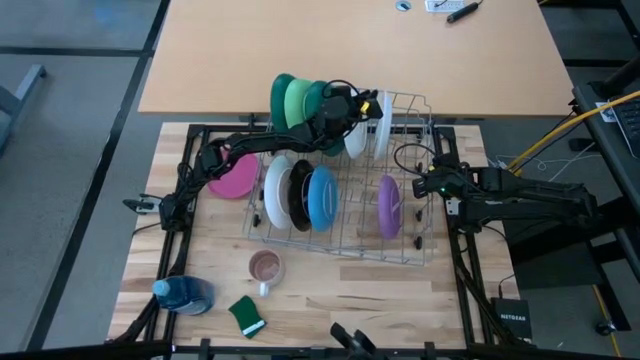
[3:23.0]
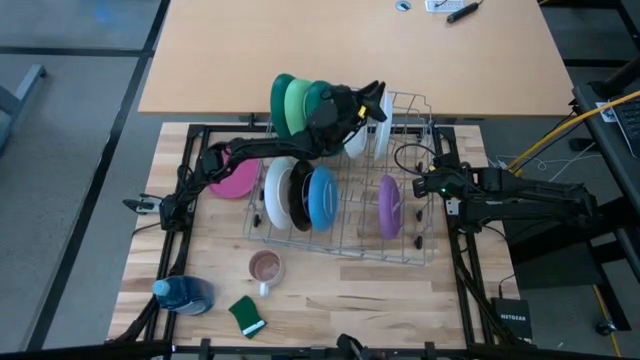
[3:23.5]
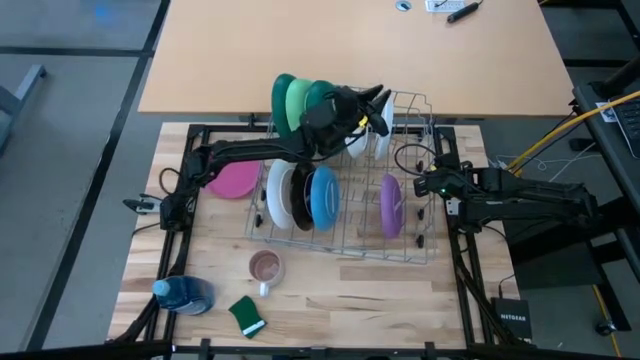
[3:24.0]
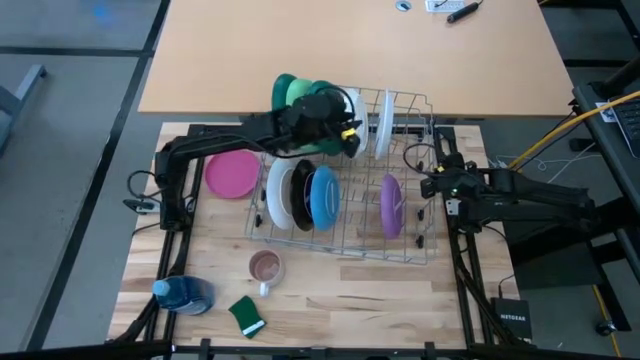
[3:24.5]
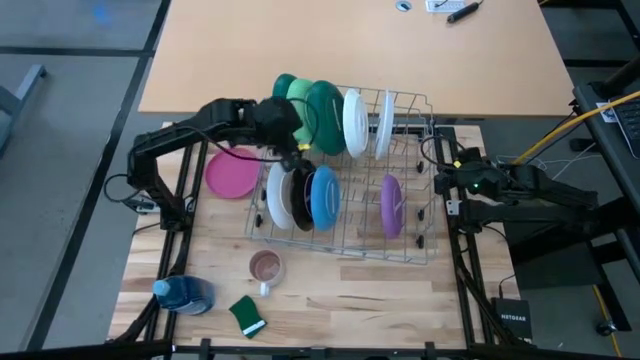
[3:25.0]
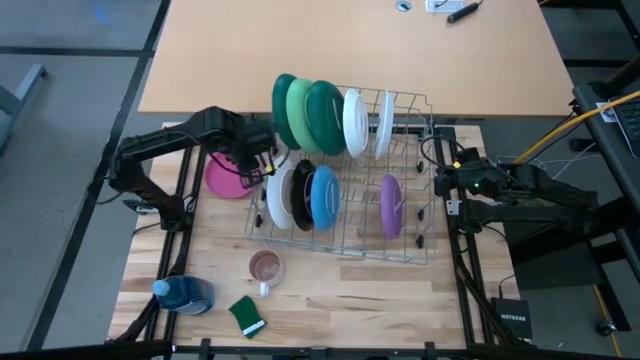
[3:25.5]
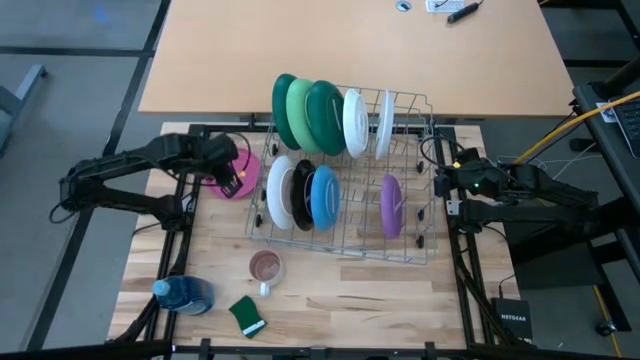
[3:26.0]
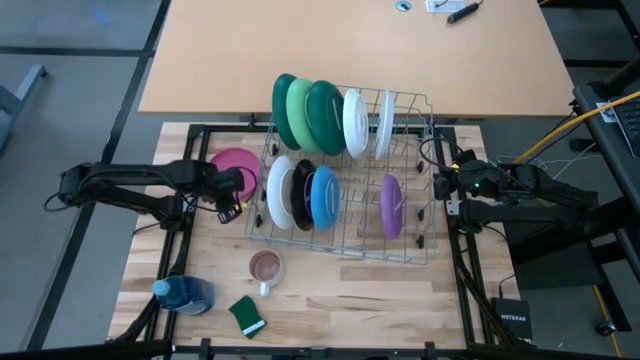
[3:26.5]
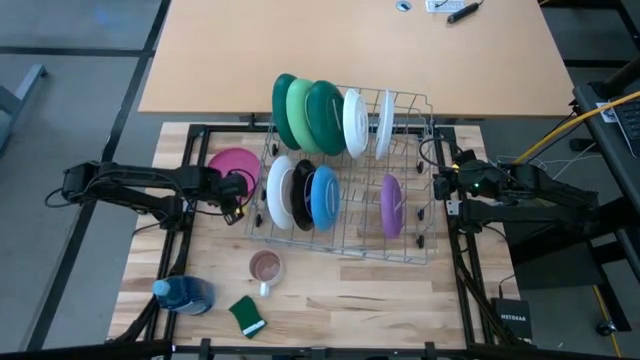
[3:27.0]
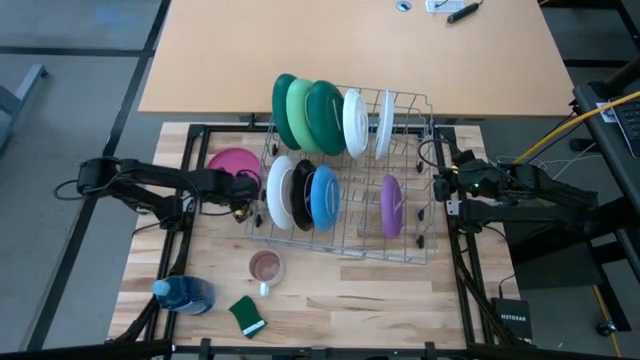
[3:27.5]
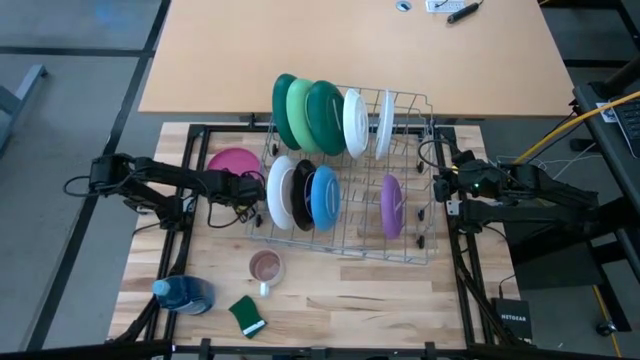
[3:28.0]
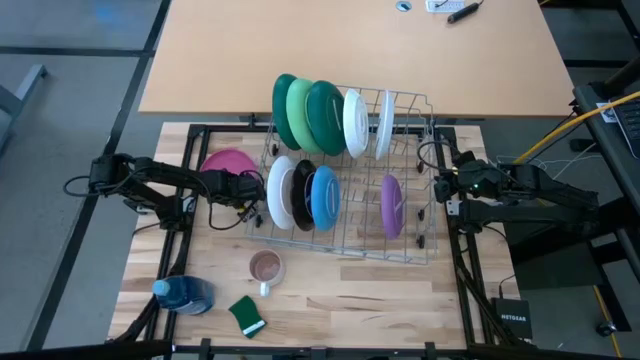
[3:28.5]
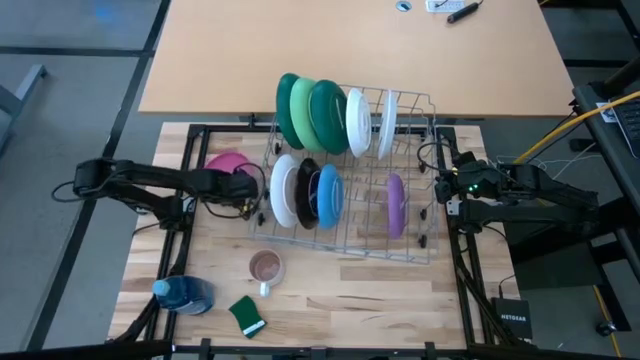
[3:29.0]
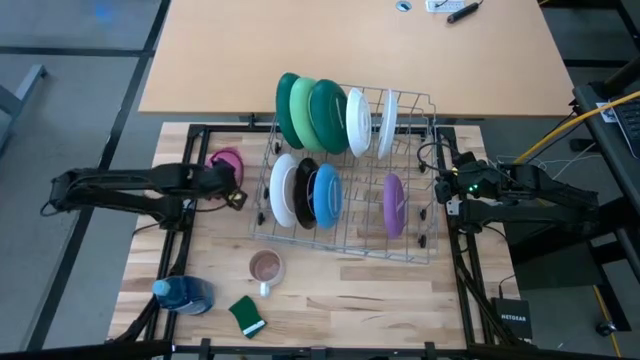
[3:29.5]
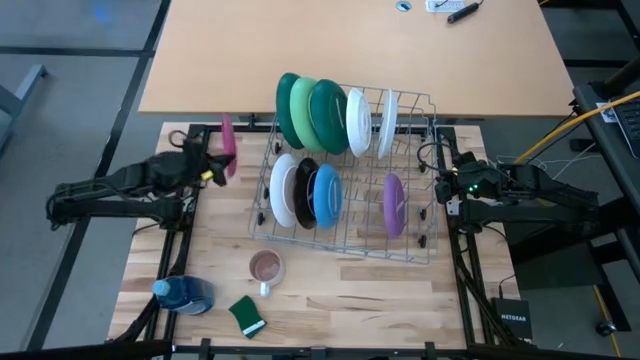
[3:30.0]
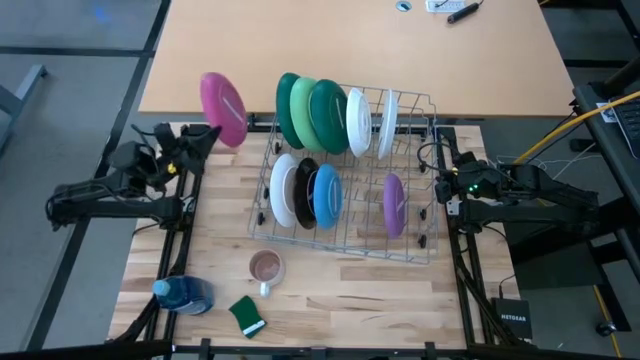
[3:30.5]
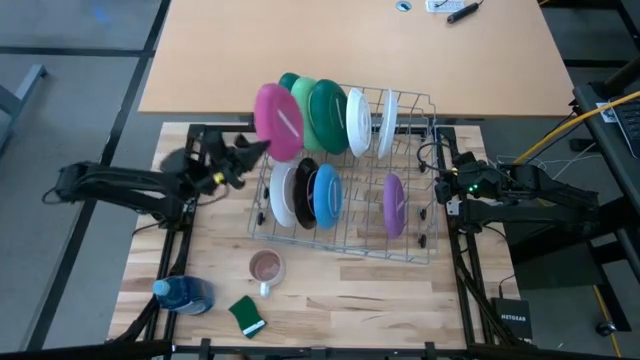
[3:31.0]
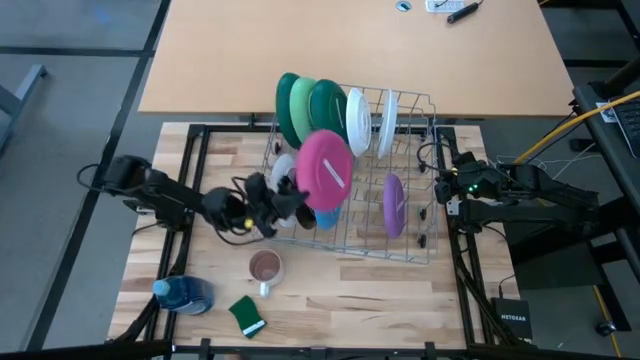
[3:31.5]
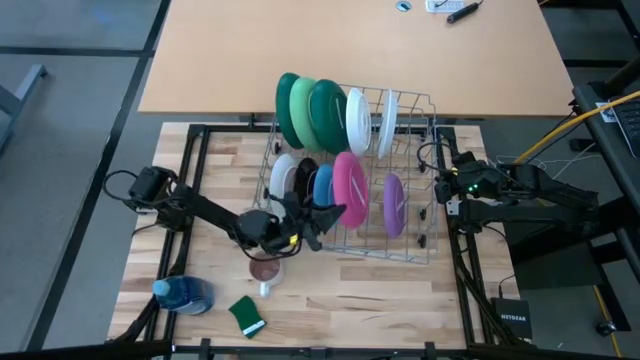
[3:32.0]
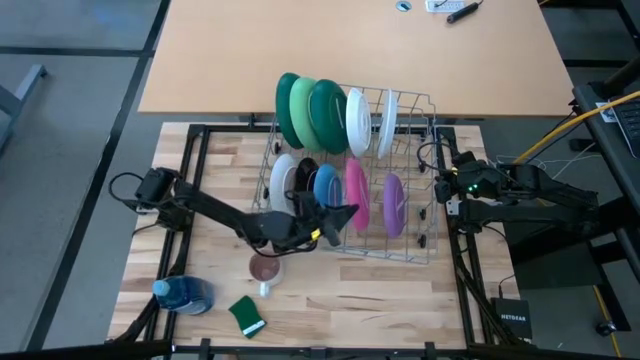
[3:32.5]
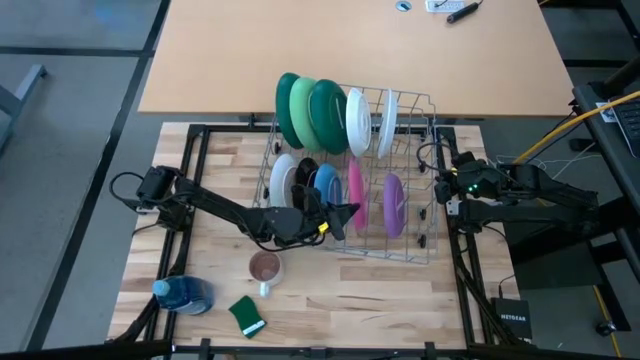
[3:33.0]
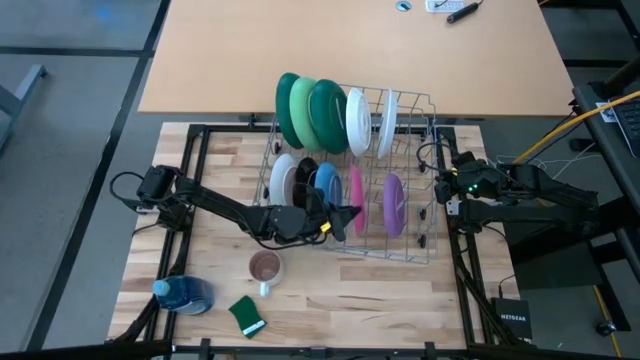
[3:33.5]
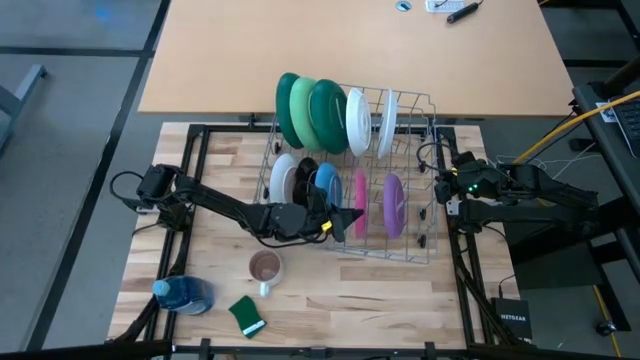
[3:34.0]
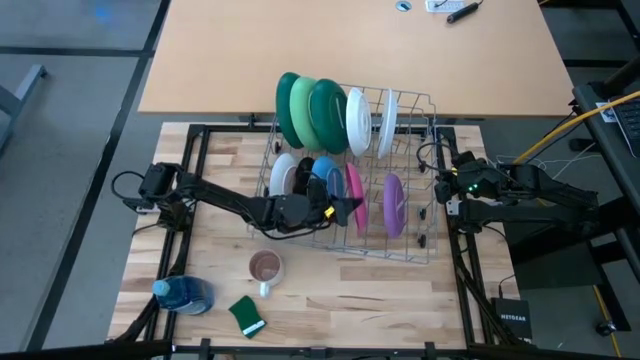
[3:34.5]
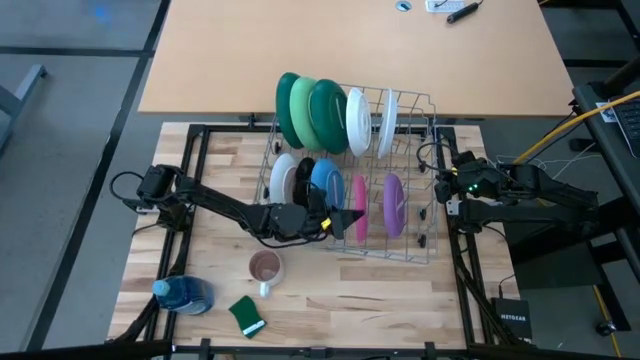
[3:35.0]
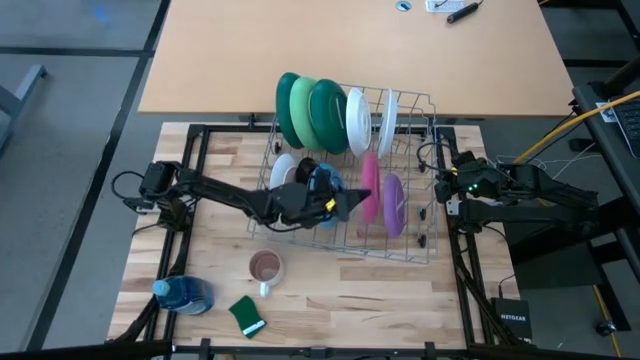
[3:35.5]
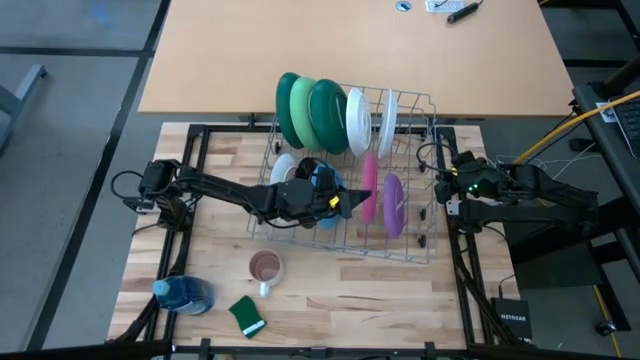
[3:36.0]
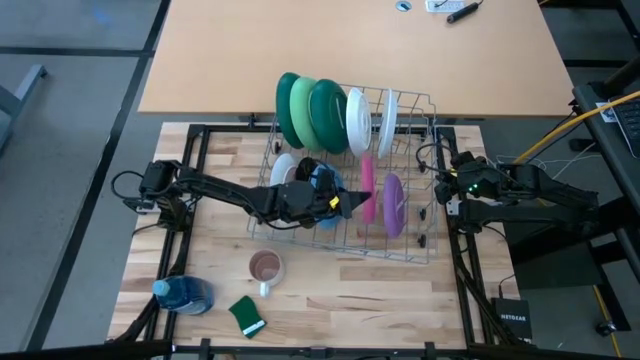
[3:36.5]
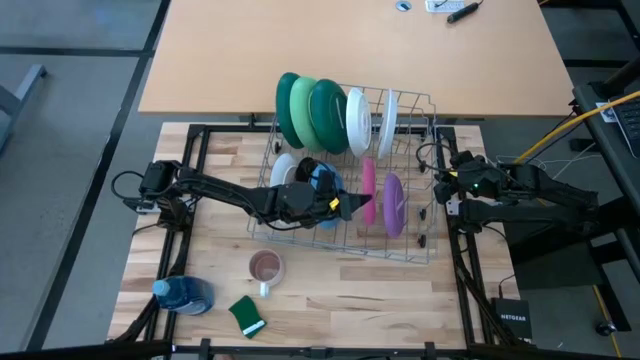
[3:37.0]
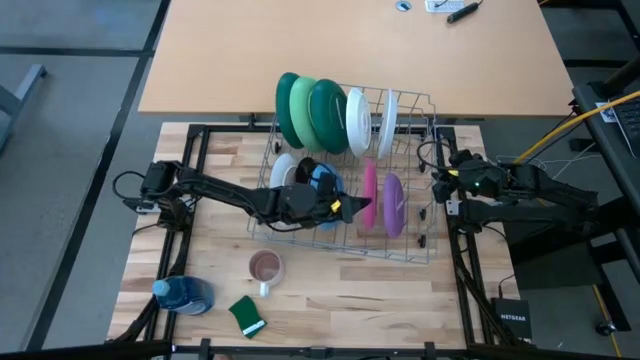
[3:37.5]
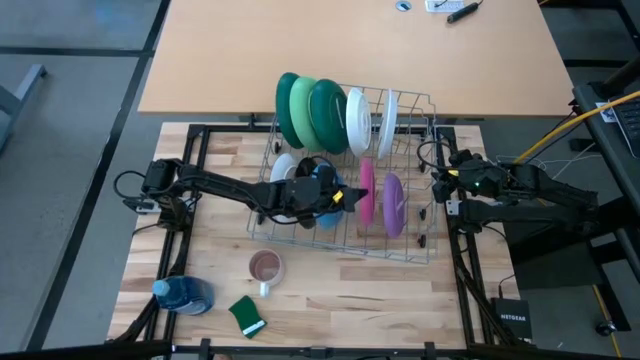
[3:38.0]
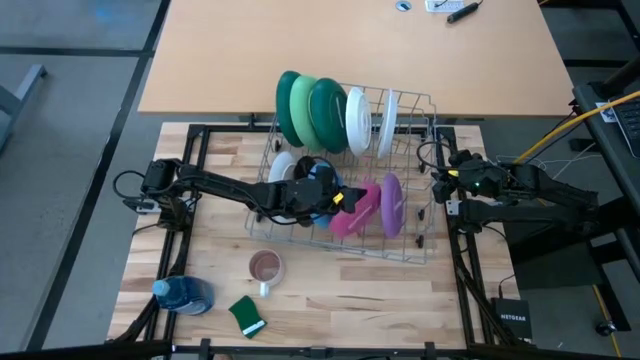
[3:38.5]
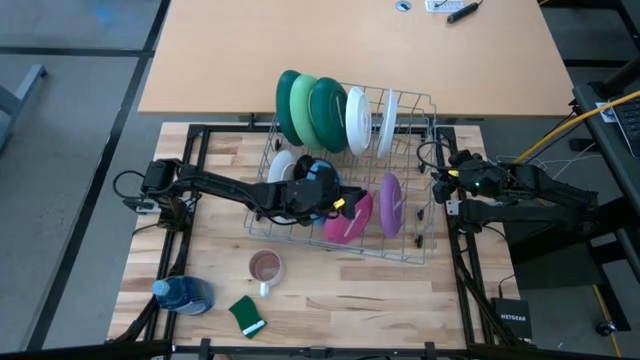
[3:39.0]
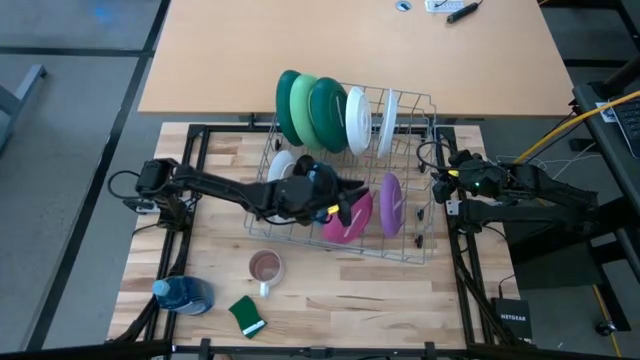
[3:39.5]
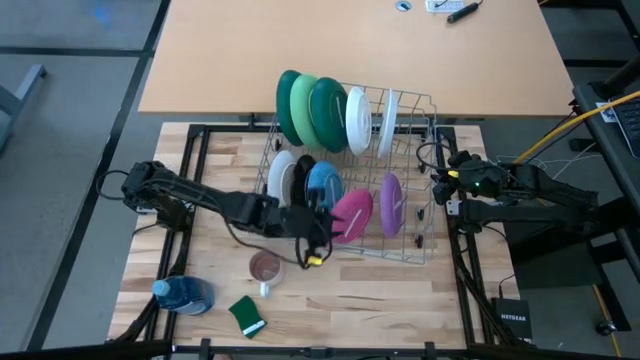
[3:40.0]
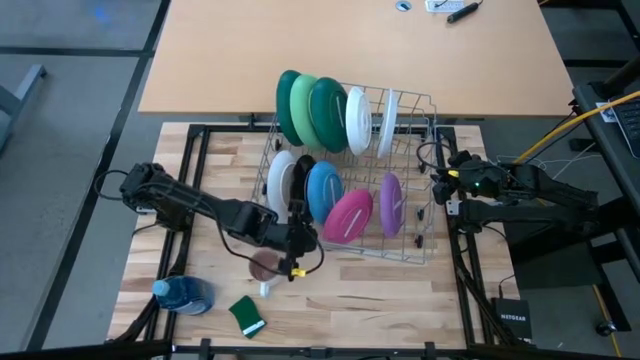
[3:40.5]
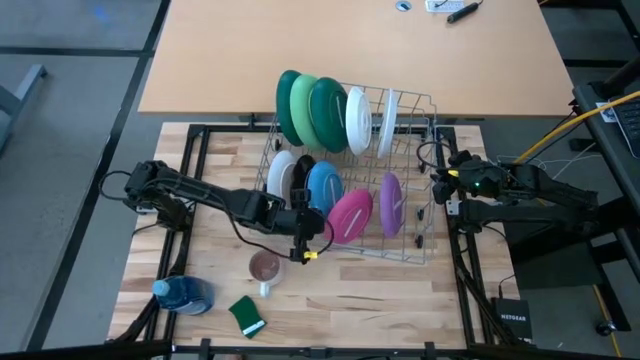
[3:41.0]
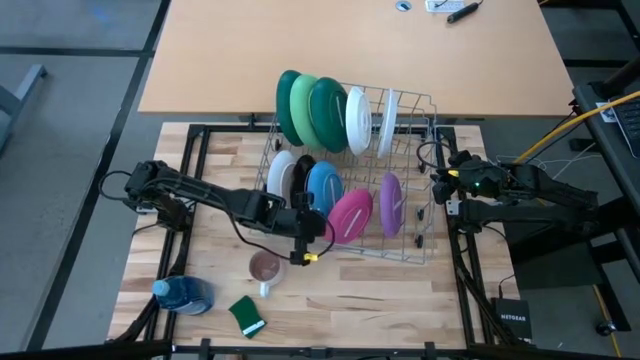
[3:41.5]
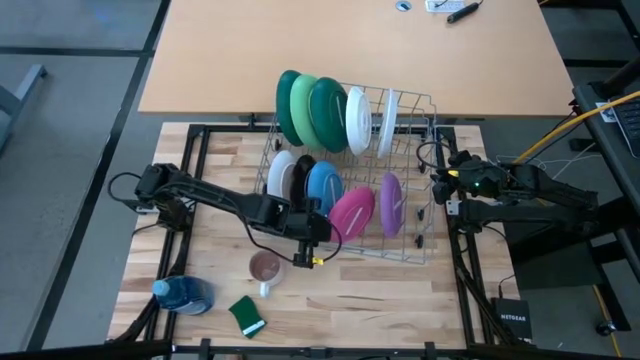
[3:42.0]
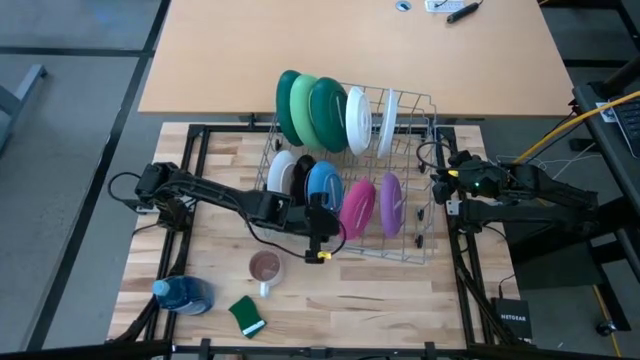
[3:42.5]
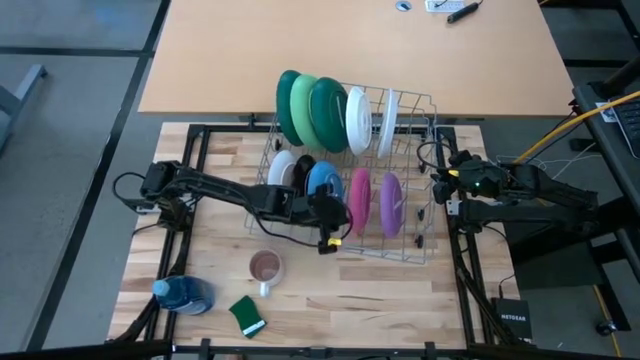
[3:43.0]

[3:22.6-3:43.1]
Task: Sort dishes
Put the pink plate into the dishwasher rack
